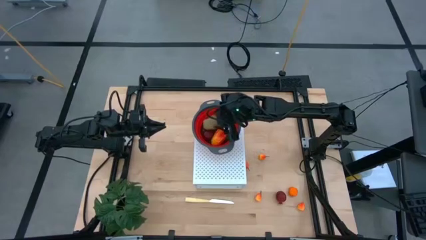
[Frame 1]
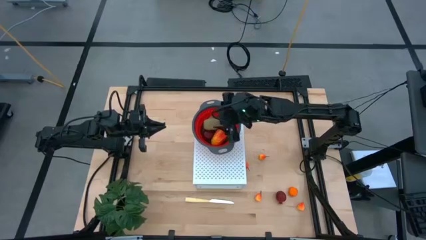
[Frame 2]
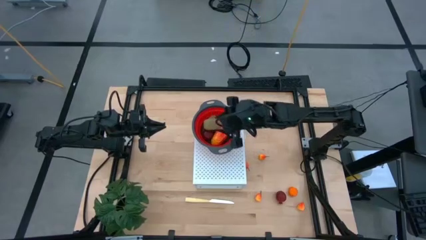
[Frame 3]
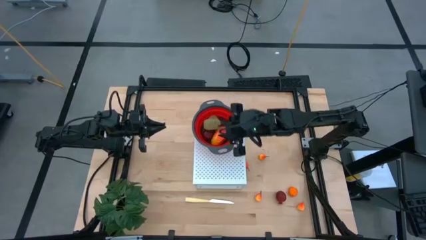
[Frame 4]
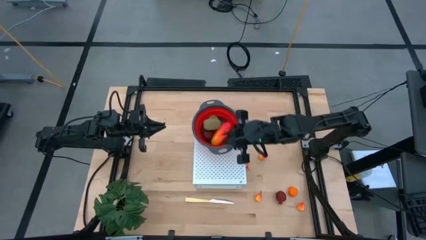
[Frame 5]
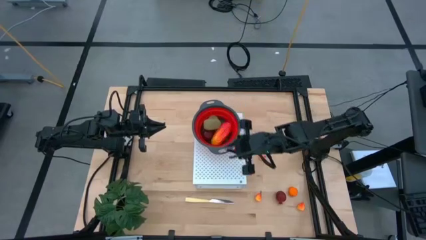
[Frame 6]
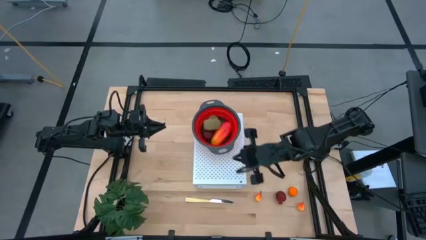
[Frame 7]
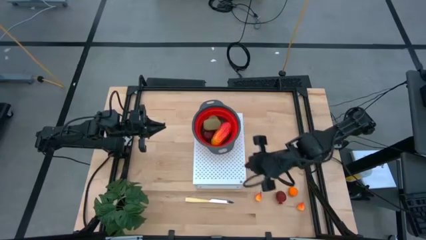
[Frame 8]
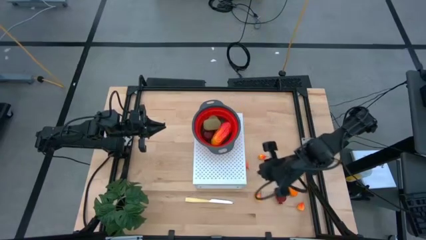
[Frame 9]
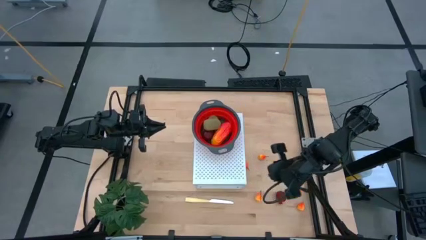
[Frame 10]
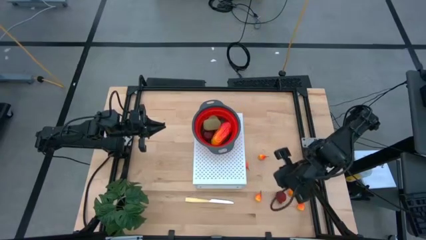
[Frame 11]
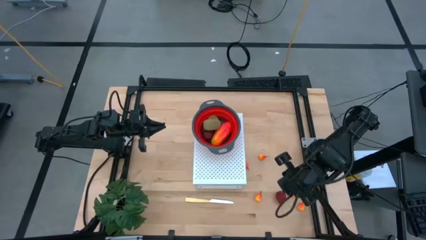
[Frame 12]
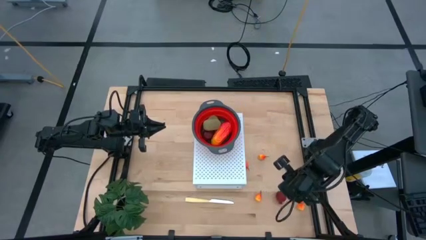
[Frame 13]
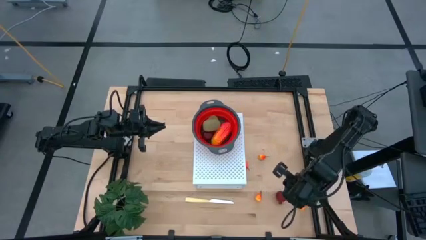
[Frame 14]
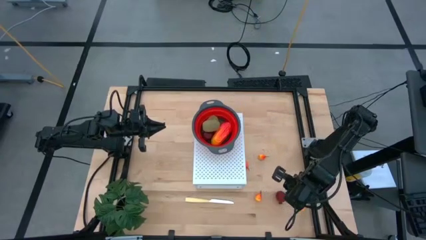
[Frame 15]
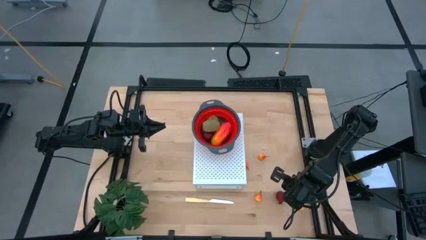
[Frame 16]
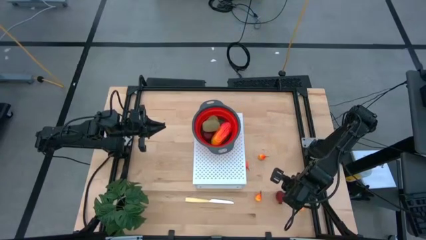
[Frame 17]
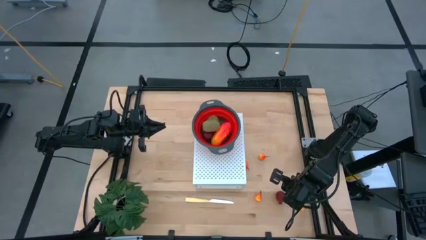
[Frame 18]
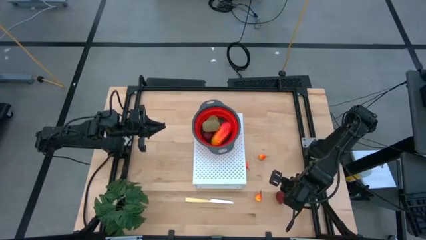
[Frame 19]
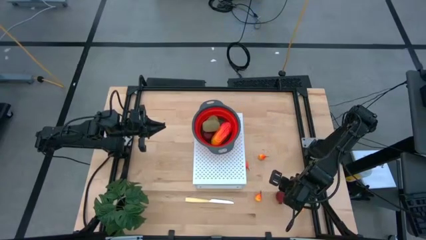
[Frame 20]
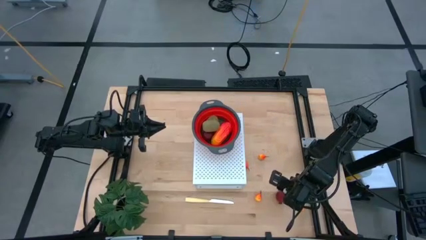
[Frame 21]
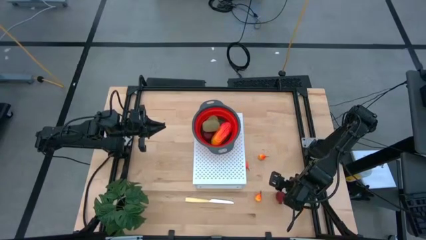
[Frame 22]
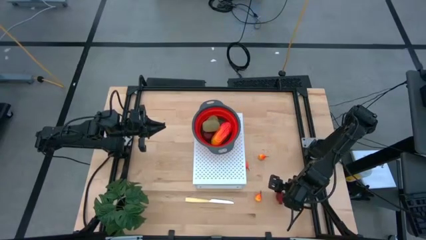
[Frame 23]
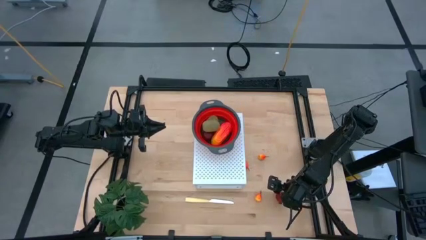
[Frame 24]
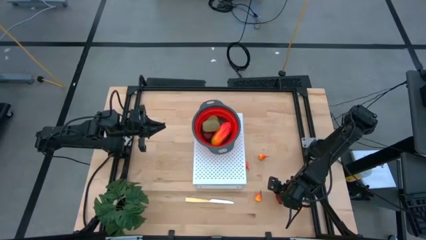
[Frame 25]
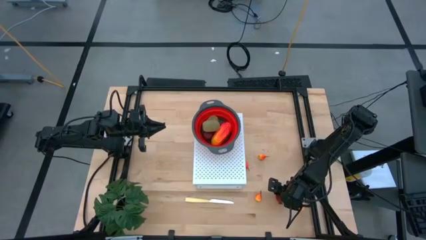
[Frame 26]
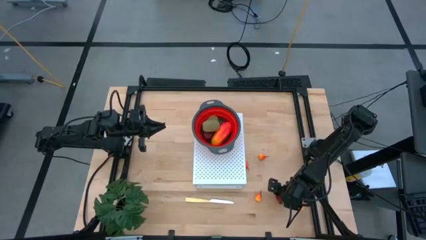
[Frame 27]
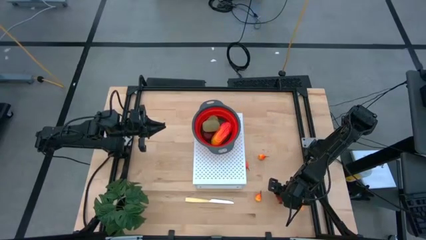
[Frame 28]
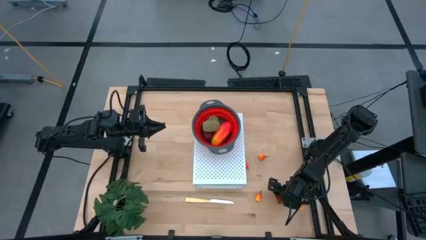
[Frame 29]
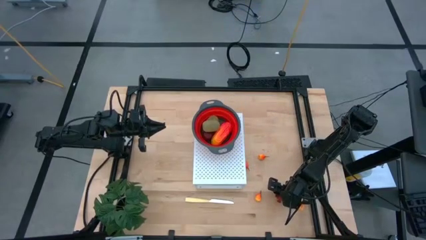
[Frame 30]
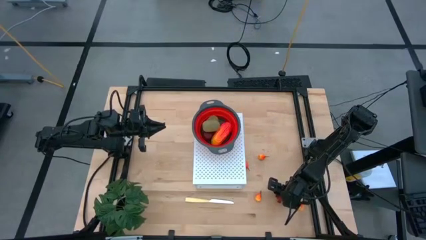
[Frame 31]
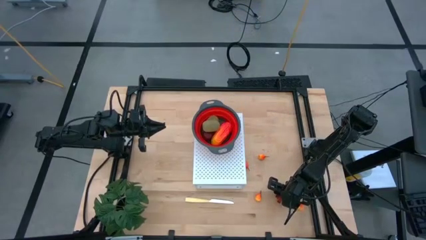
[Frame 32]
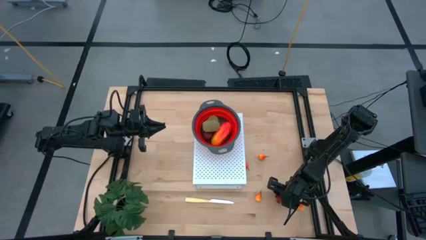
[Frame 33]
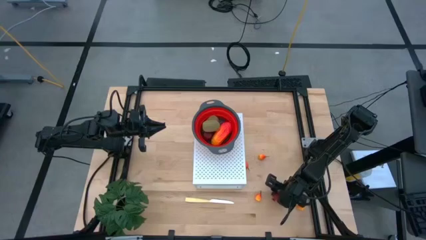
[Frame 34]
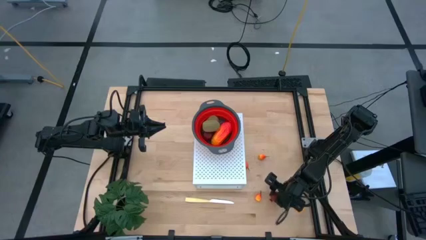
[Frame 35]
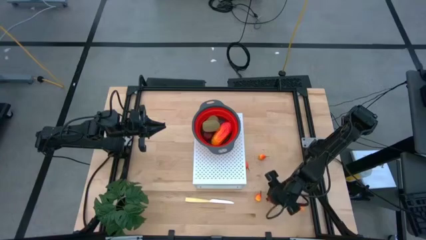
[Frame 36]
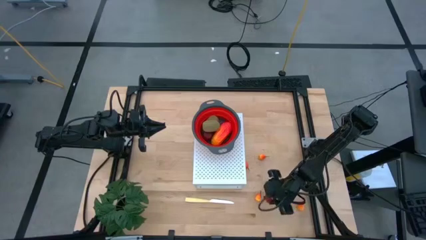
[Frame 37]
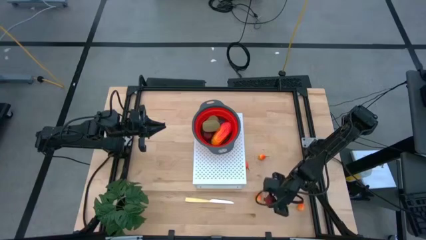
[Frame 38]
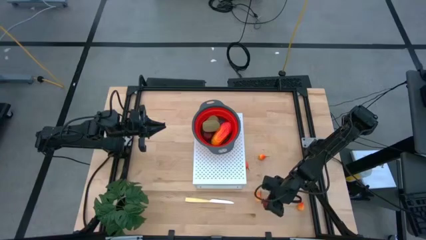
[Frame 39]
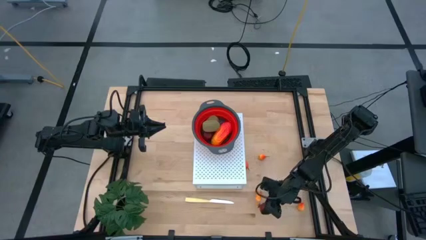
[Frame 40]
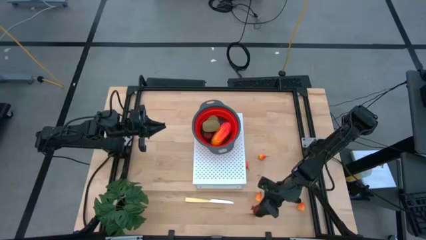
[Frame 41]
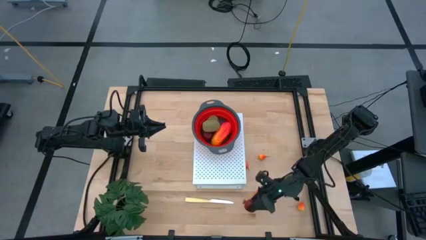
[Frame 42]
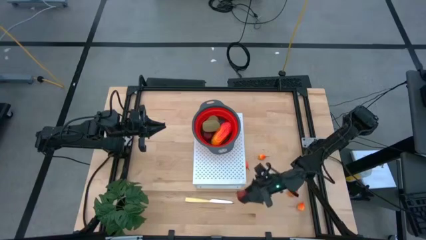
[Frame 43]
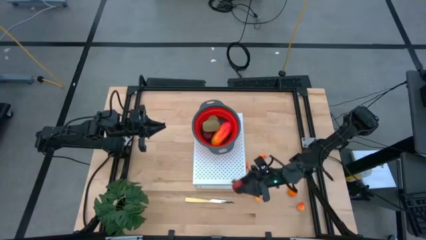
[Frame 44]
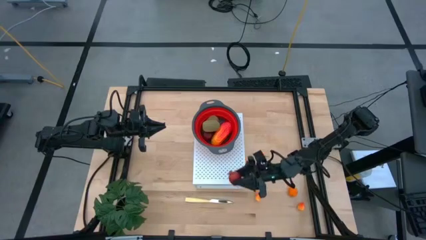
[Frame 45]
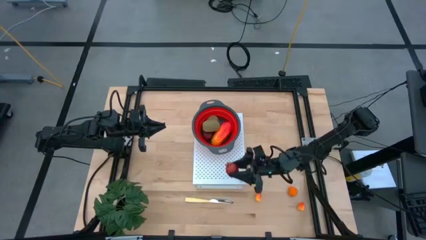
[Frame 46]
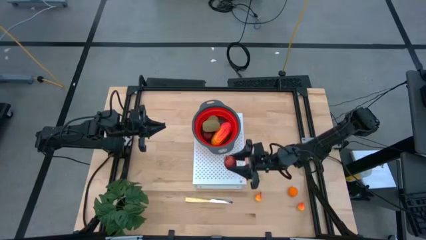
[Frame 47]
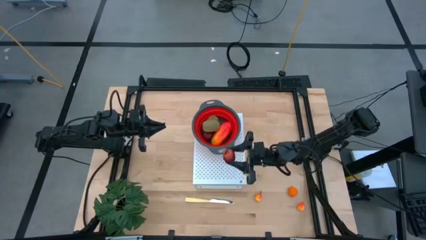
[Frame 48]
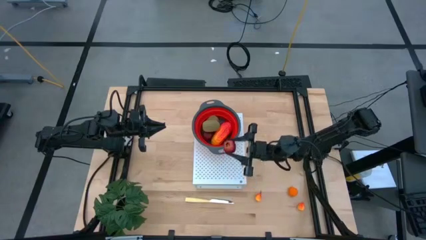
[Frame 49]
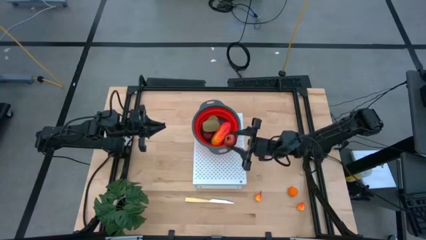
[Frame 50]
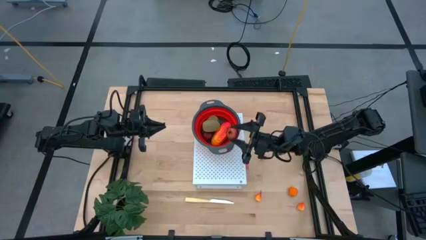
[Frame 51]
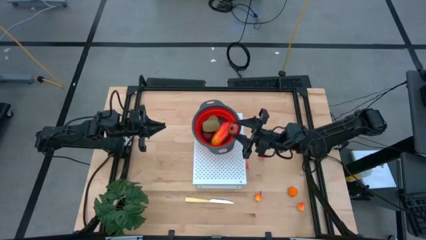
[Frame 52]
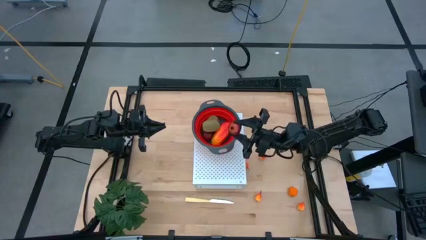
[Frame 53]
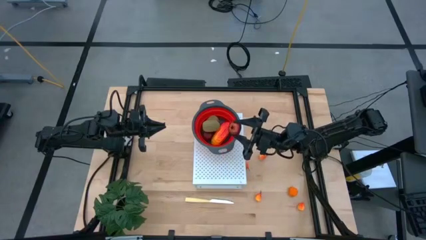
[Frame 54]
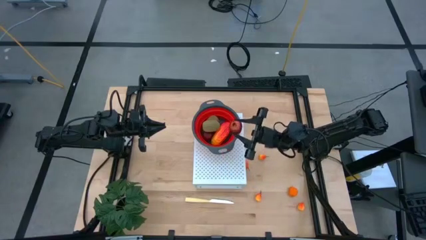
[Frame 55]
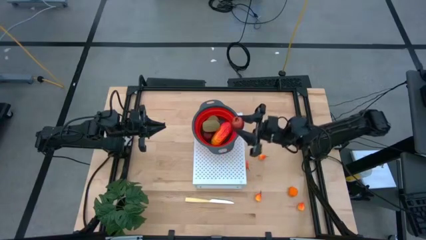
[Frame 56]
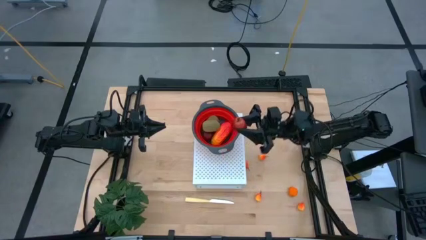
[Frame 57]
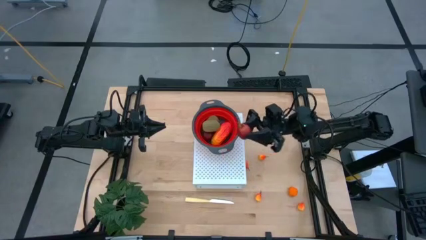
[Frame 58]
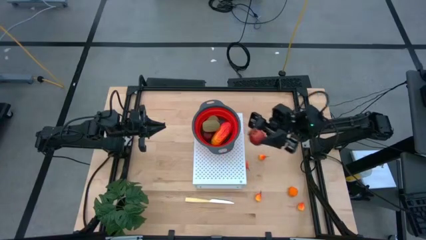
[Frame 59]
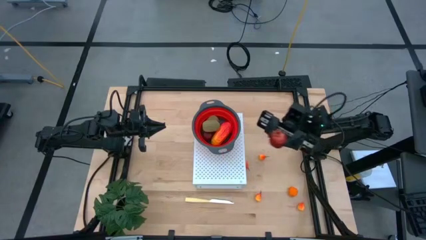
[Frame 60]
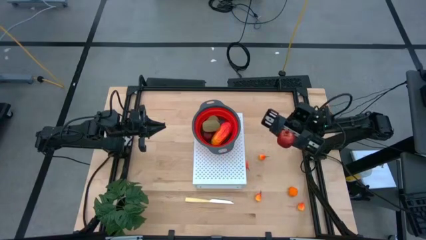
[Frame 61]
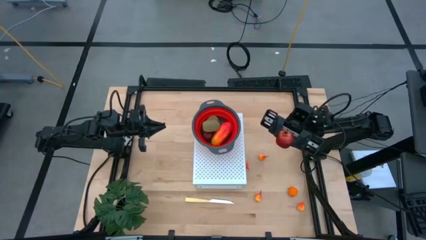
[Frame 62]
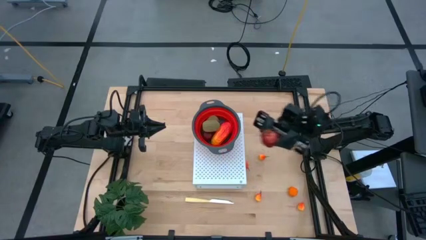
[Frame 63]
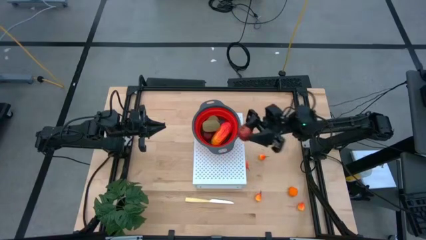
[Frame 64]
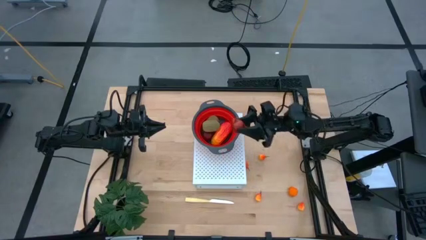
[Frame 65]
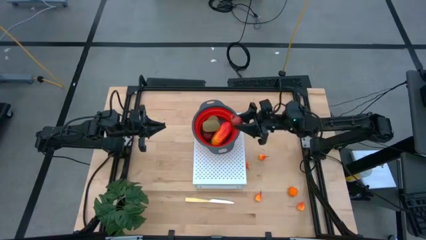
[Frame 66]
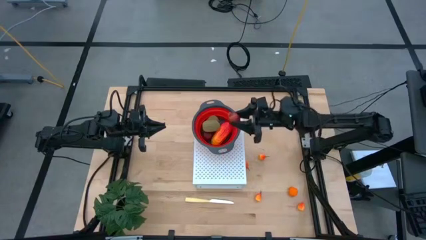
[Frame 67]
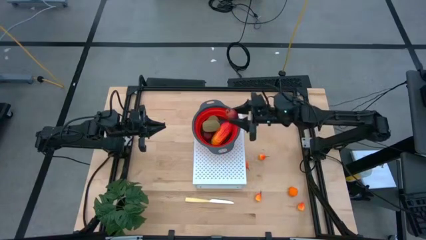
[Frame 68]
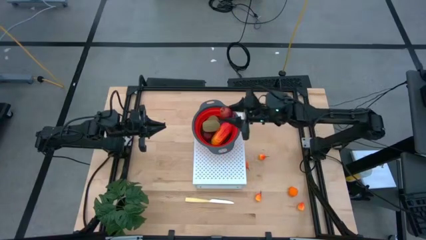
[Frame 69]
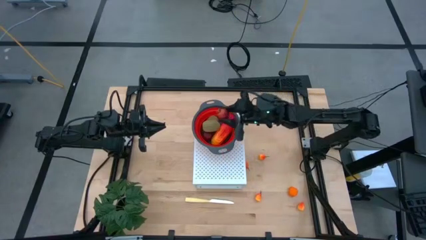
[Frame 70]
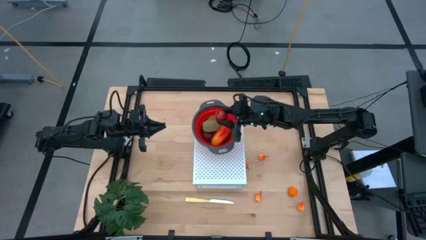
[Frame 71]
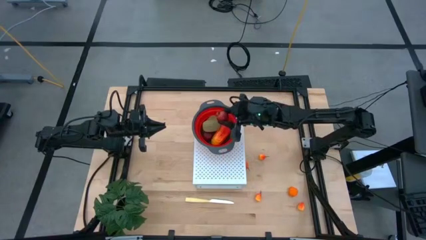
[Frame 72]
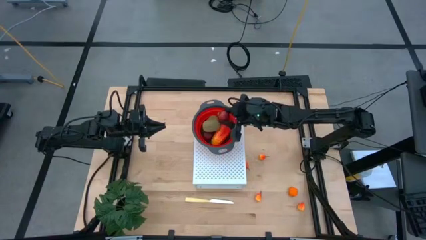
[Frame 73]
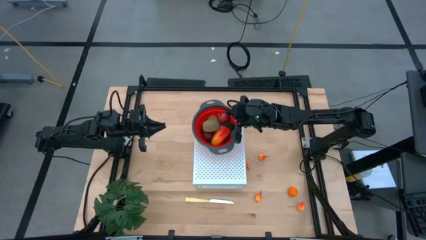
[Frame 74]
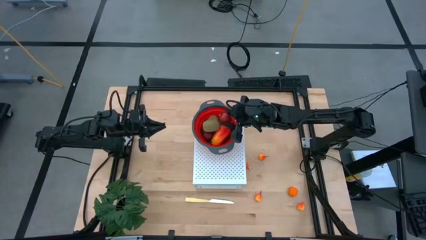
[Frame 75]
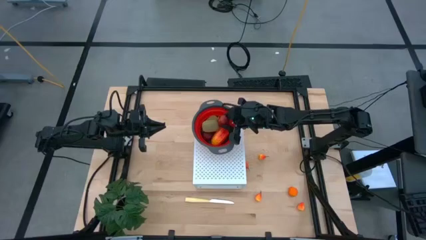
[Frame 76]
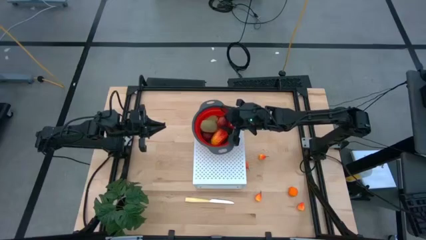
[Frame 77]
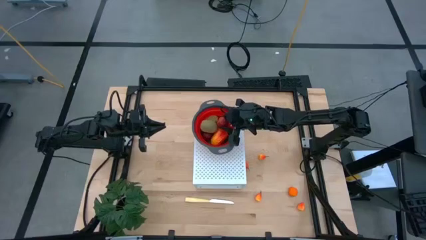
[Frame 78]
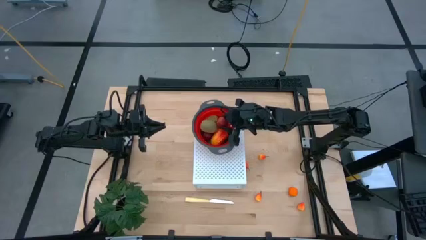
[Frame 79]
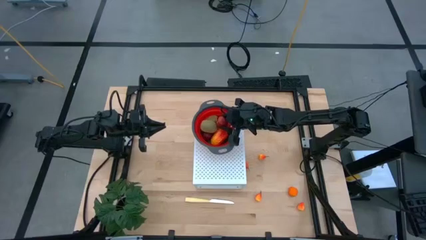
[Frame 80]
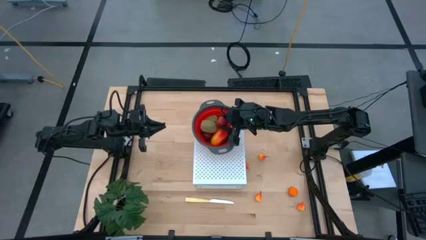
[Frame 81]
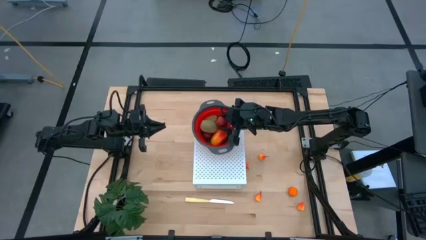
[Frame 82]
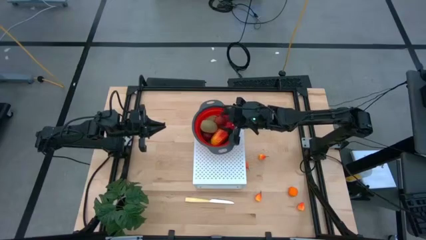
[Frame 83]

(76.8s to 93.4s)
Task: Pick & Place Fruit
Put the pomegranate into the red strainer bowl on the shelf
